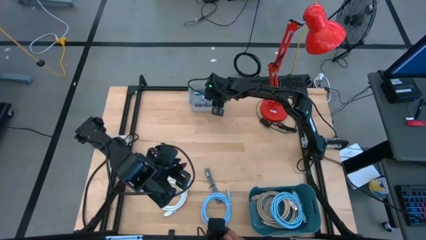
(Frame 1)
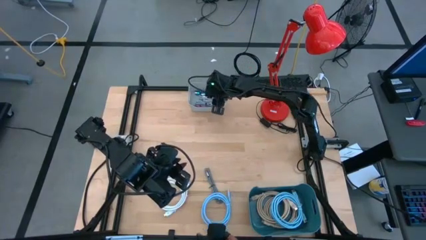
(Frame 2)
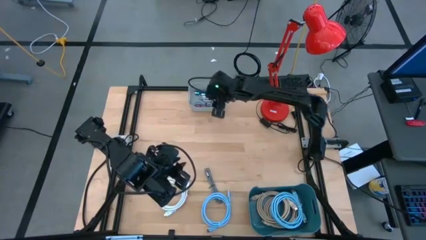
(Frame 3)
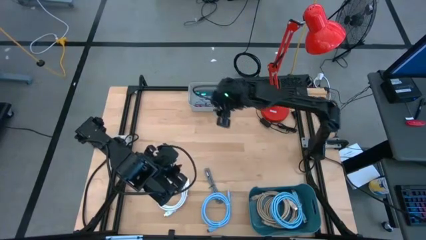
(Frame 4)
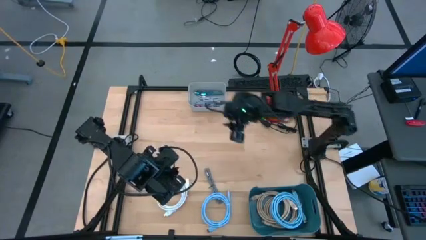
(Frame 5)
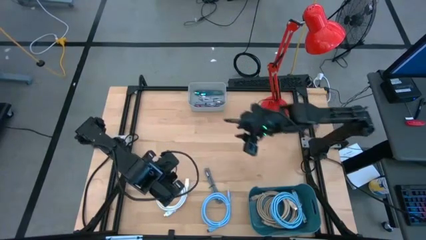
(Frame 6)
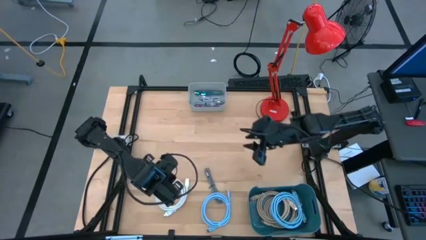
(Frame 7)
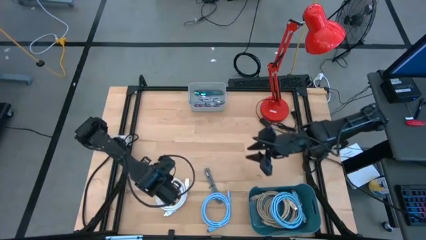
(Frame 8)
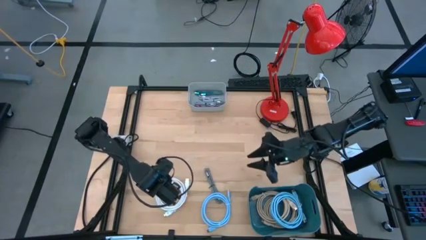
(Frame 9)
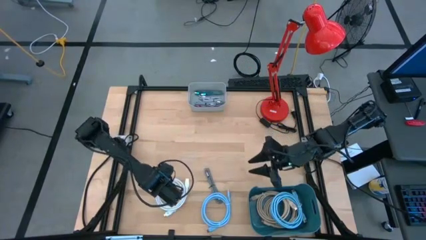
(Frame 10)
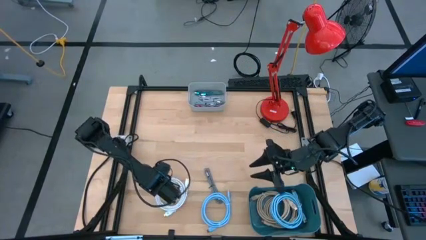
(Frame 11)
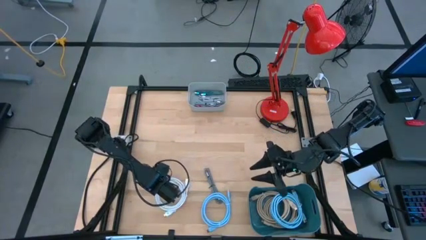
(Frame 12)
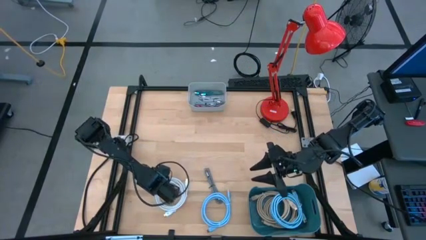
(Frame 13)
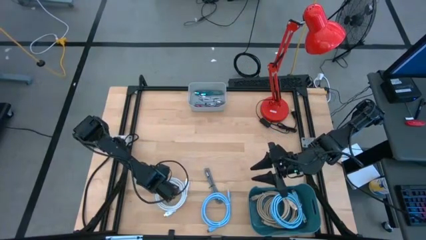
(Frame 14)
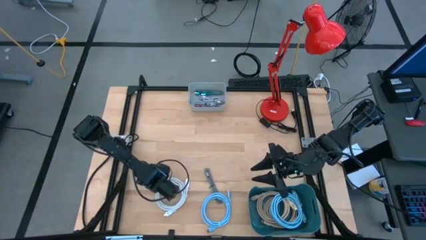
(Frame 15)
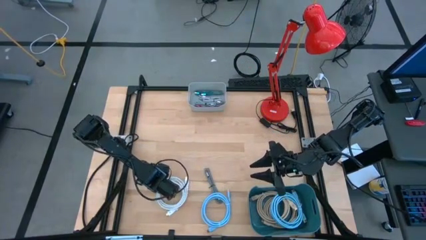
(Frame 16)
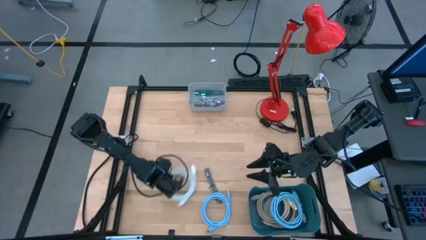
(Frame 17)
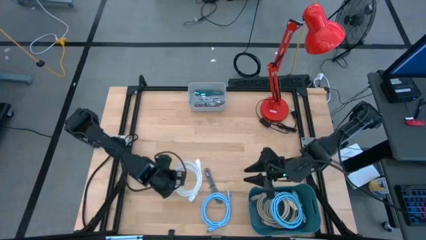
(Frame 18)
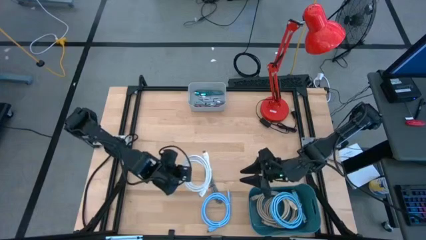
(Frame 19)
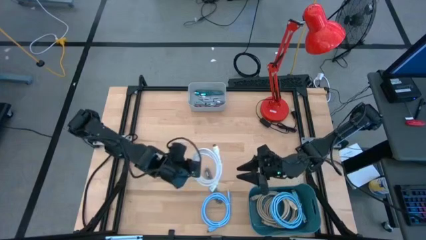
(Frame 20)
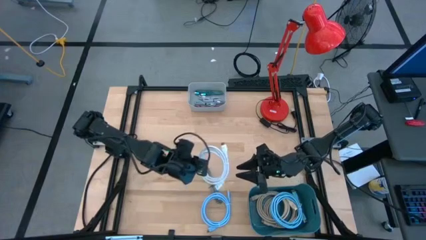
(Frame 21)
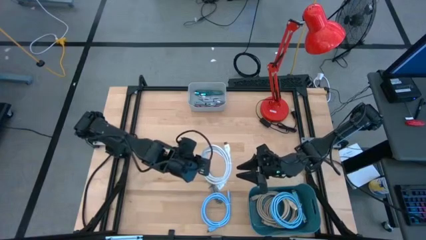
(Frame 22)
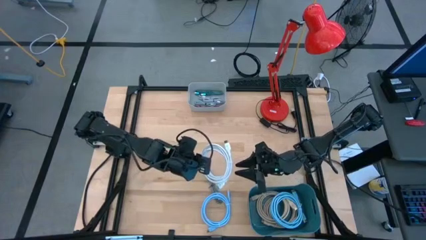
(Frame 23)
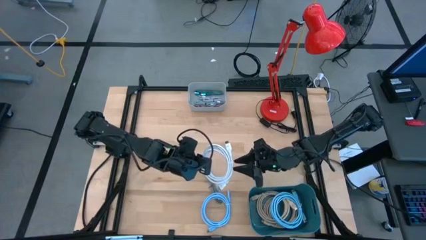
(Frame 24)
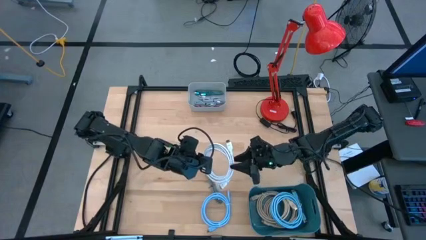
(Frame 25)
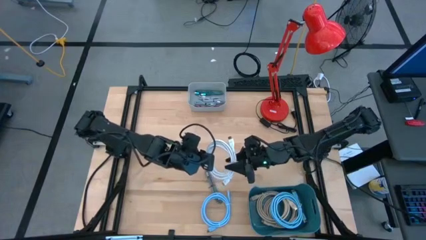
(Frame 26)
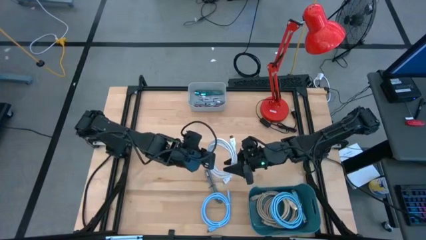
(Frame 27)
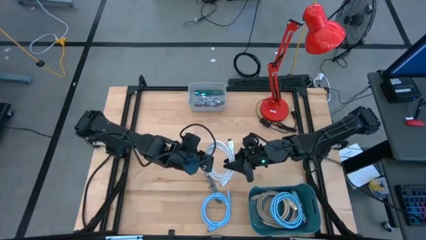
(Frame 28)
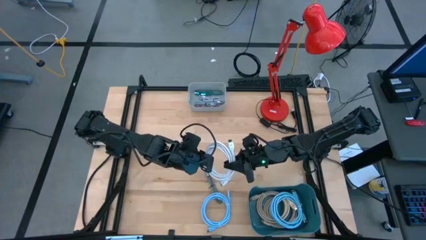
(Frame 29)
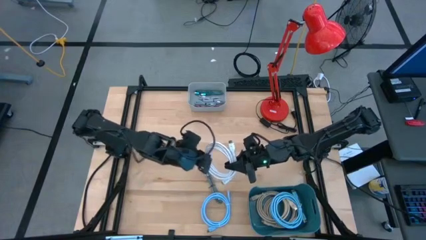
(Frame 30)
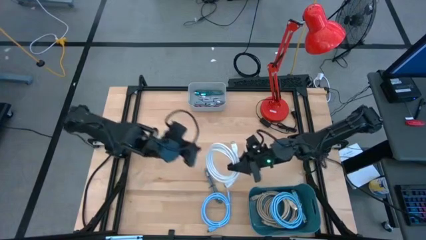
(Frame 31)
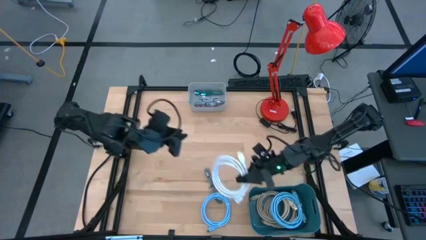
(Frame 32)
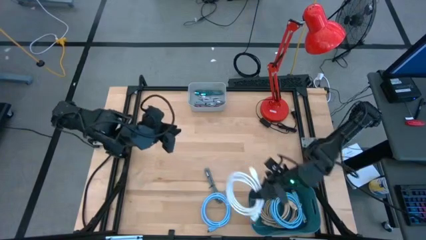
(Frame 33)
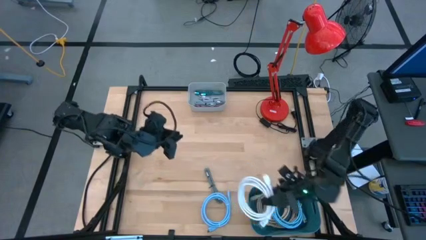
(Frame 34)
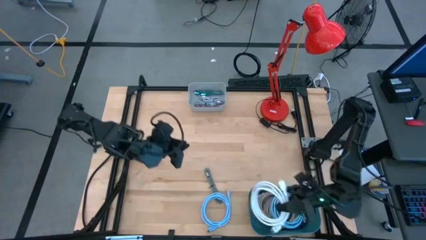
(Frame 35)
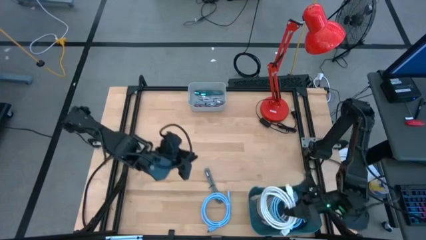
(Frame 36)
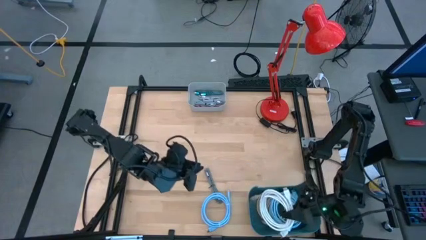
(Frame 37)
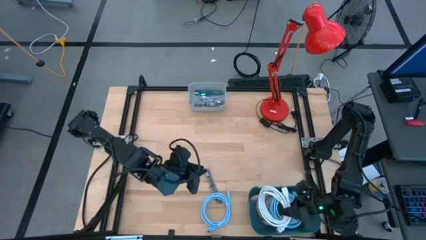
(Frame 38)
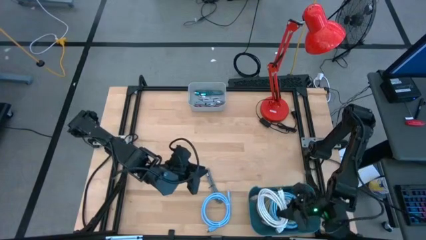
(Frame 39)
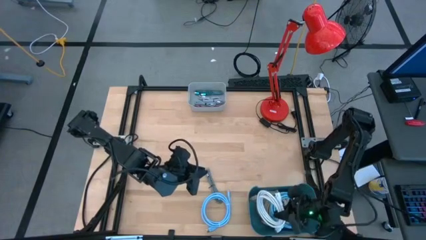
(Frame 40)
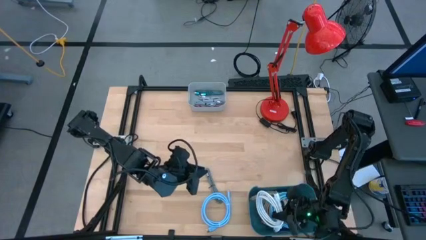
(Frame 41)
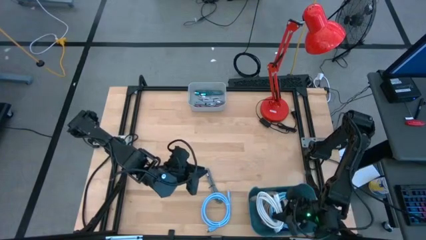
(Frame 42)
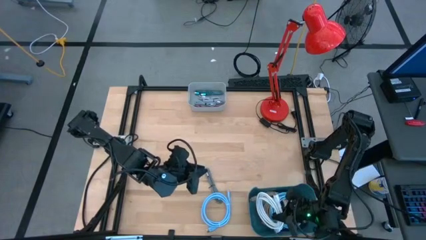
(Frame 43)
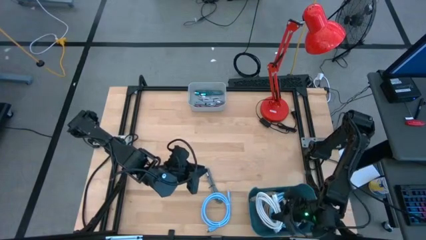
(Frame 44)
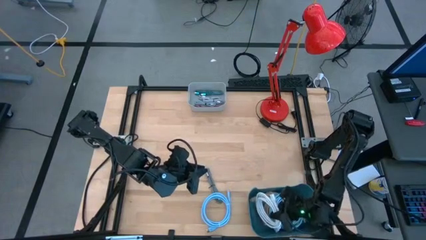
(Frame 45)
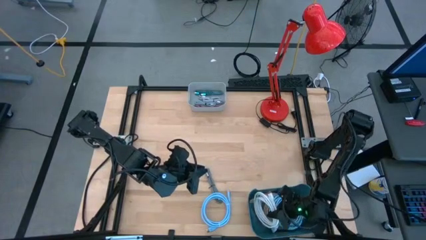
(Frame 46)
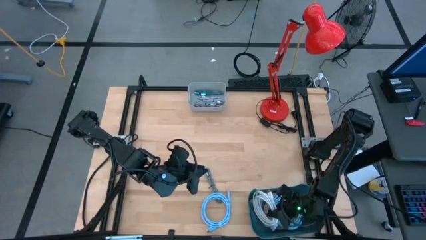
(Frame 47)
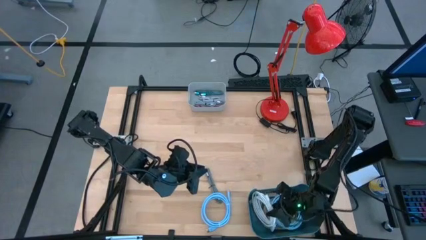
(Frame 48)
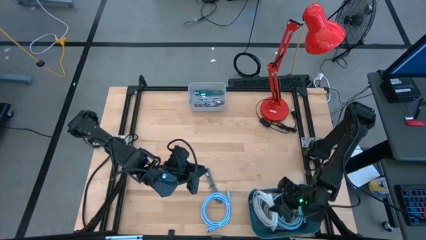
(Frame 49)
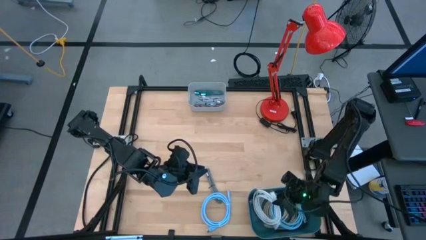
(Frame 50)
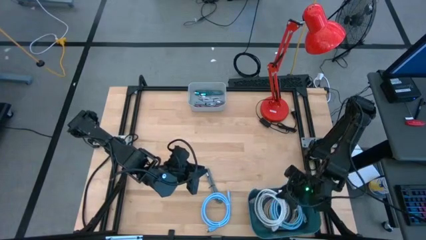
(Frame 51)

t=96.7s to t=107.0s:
Task: Pick & Place USB Port
Put the white hdmi cable into the blue bin

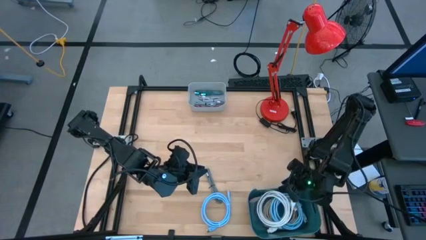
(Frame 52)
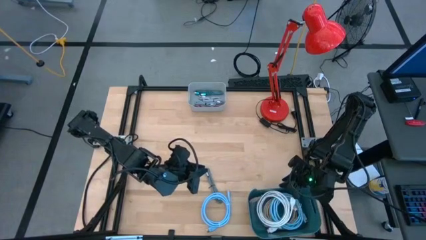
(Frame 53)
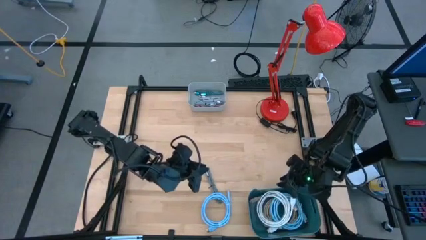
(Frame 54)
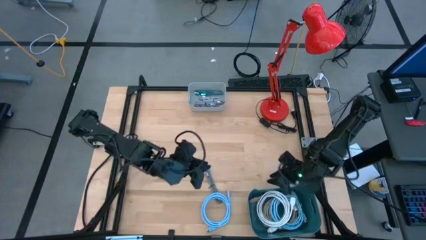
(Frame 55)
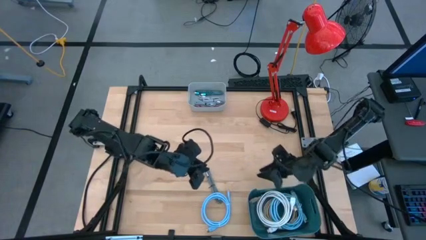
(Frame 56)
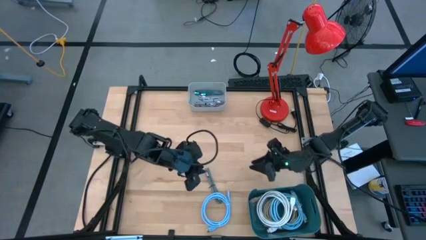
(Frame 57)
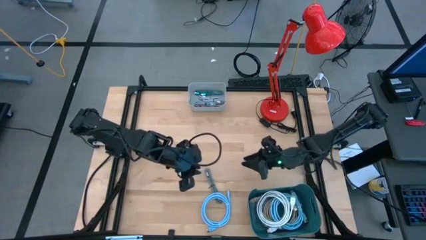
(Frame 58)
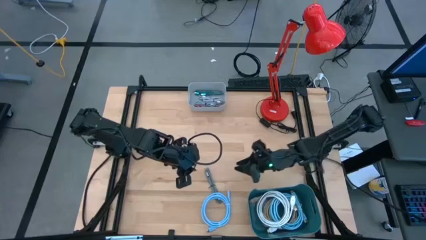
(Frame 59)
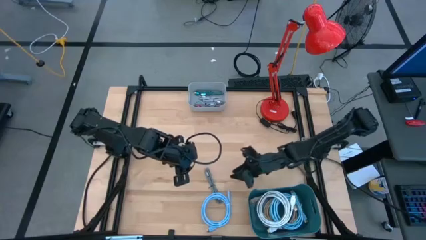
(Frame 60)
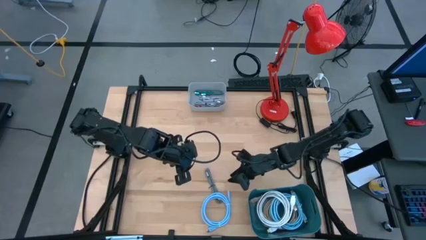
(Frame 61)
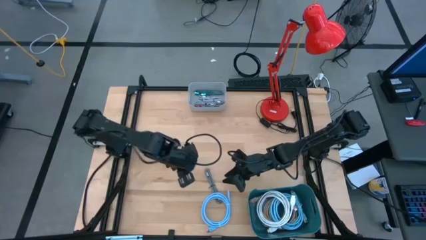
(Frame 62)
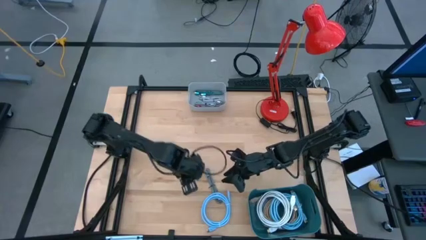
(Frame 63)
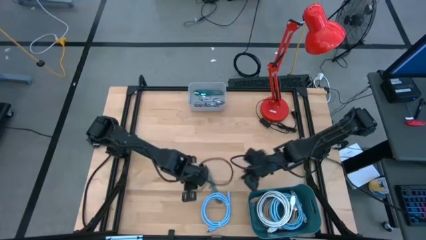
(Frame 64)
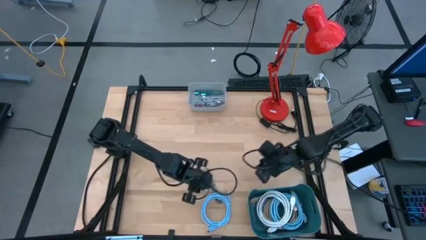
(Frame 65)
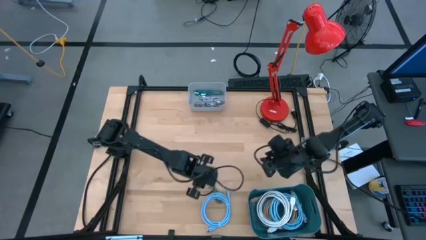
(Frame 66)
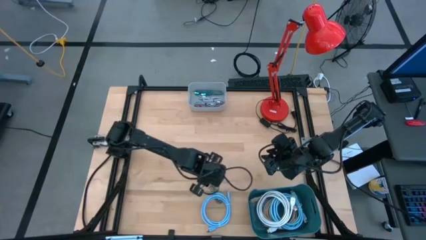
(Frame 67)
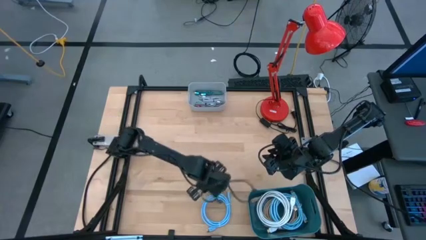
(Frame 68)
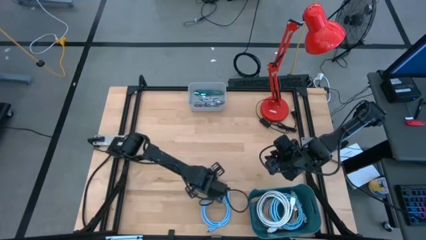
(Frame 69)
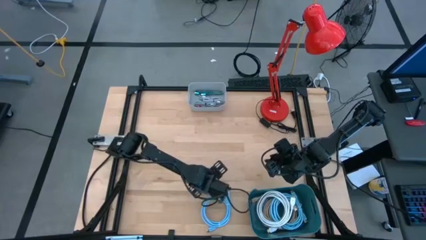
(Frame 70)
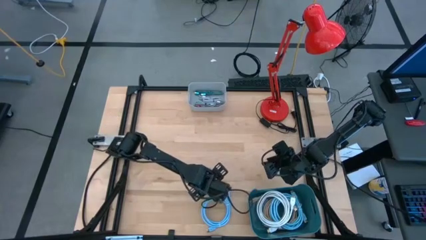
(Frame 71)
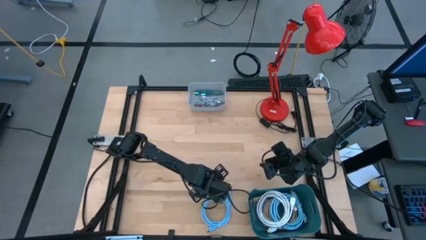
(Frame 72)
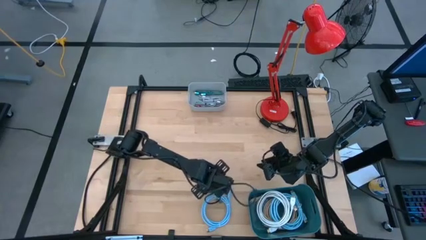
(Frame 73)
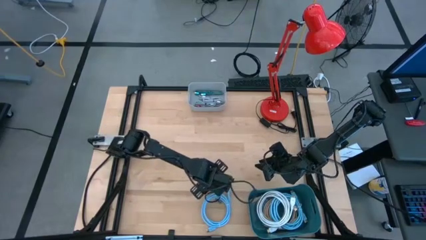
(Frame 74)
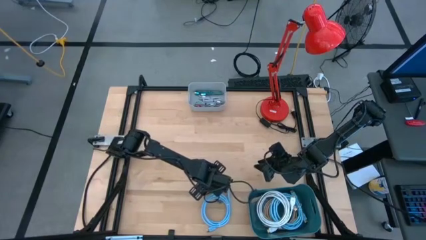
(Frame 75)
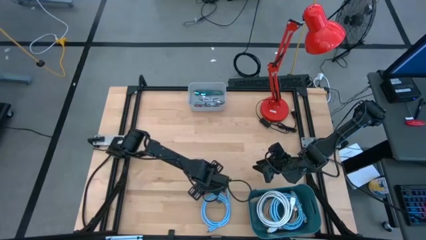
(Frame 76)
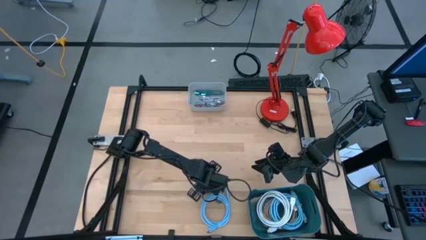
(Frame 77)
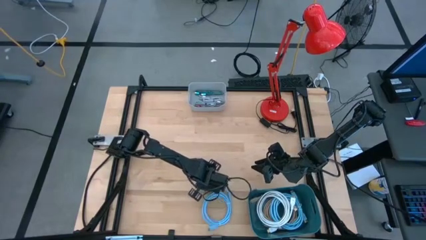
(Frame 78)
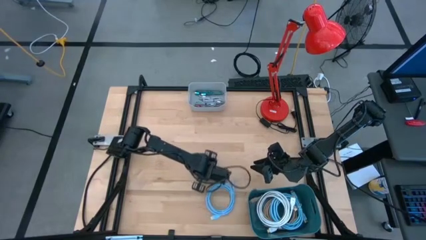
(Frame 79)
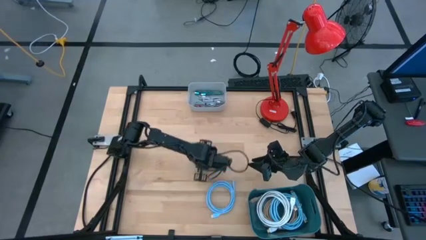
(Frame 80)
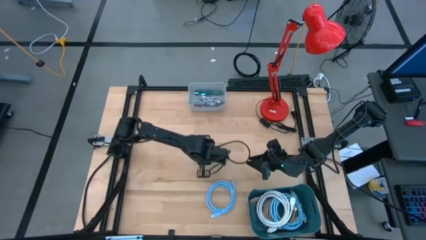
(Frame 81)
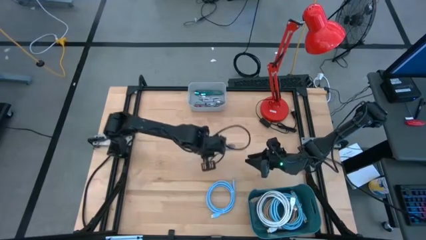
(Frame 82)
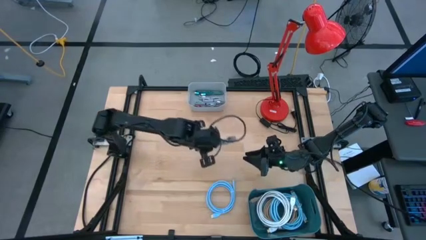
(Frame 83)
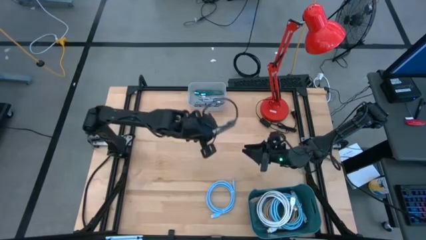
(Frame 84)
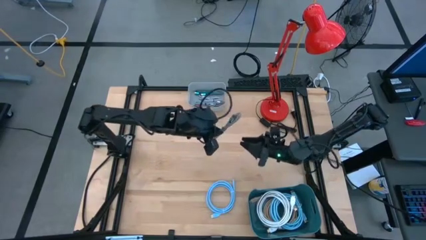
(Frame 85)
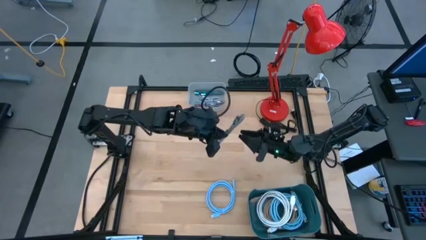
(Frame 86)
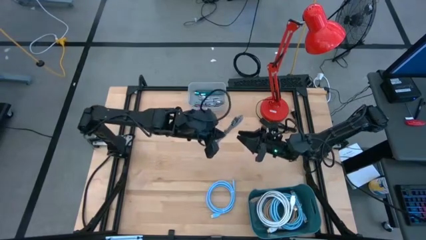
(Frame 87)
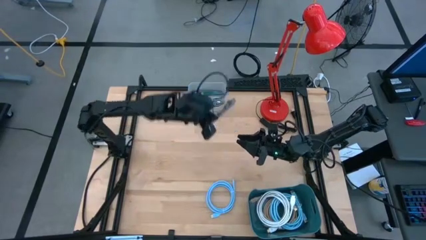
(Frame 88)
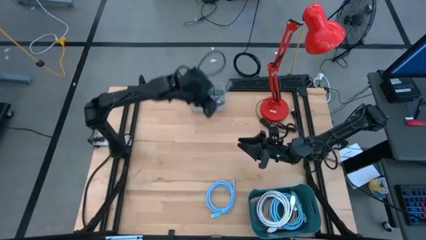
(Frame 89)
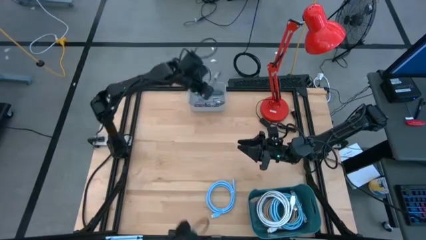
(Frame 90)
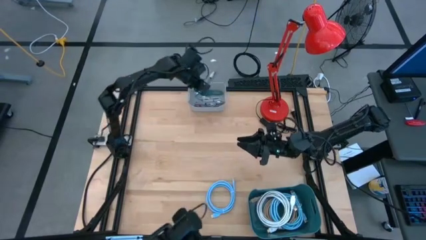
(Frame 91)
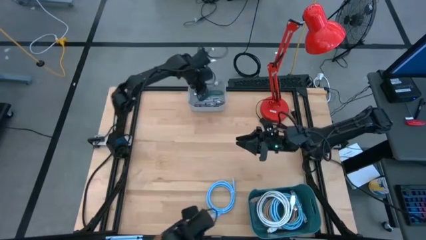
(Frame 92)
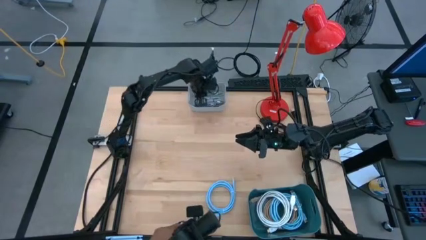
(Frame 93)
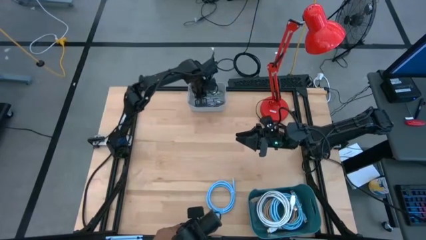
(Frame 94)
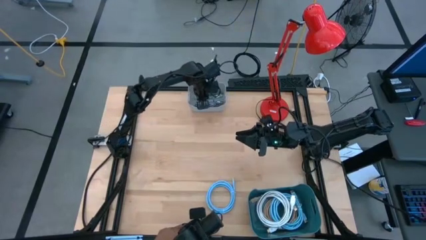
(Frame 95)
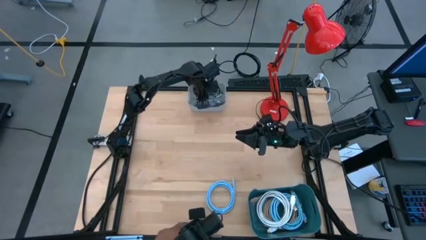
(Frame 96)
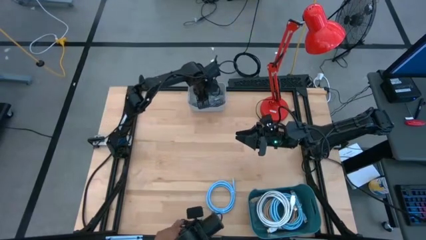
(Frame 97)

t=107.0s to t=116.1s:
Put the black usb cable into the gray bin
